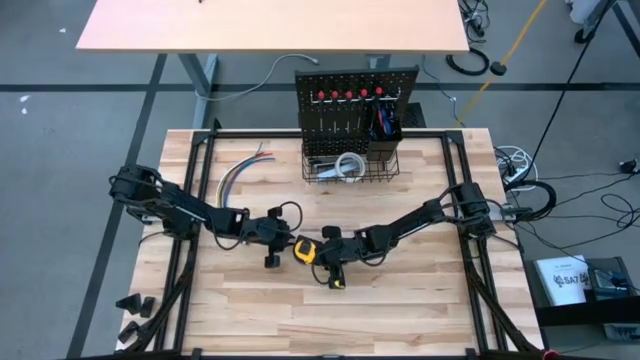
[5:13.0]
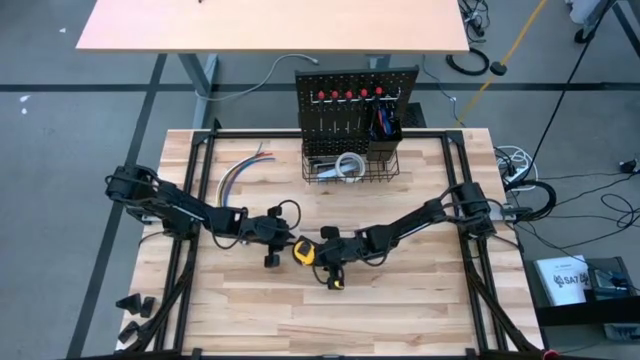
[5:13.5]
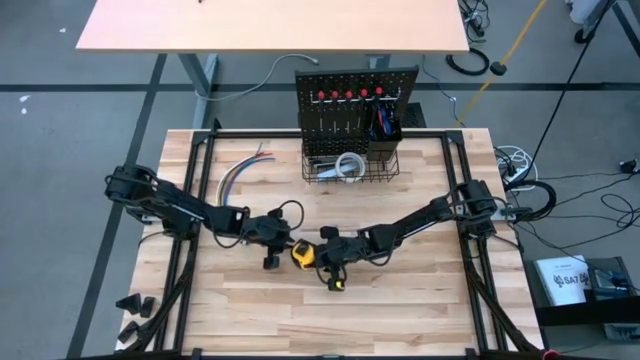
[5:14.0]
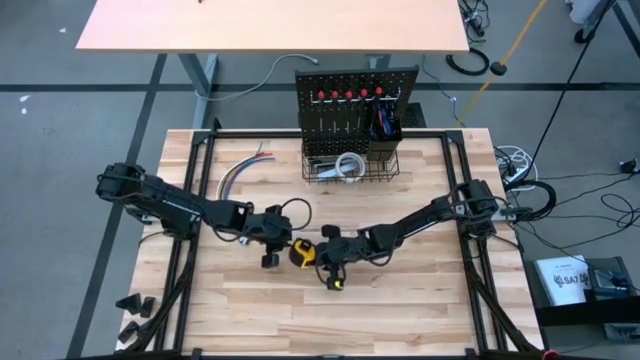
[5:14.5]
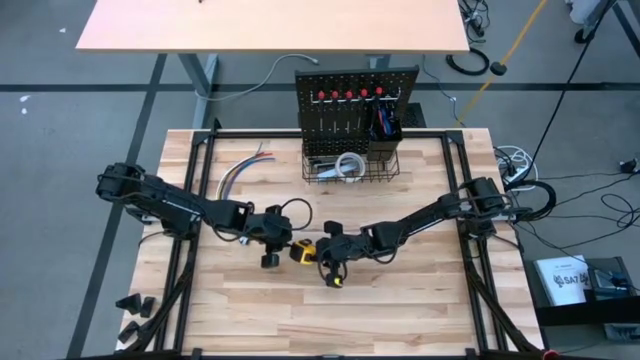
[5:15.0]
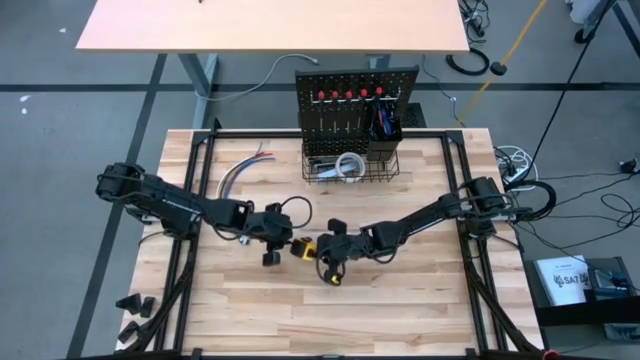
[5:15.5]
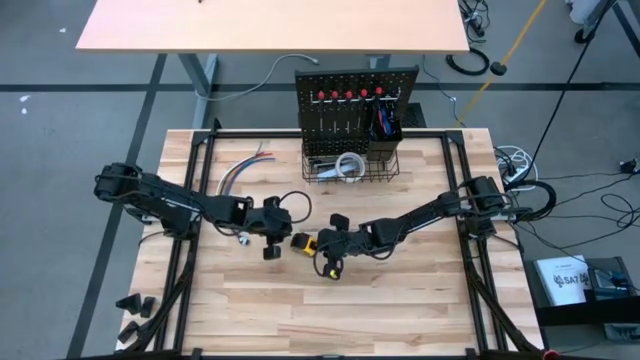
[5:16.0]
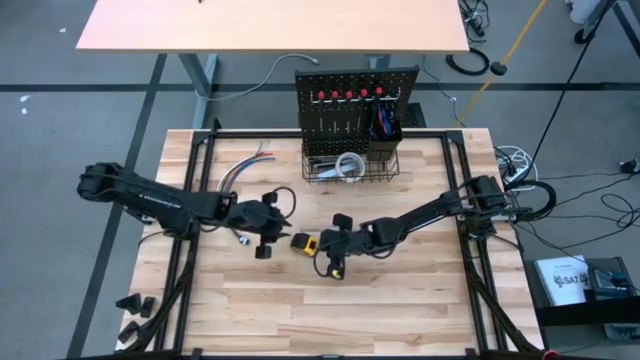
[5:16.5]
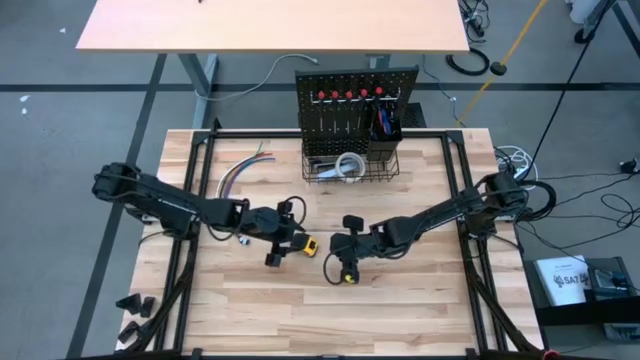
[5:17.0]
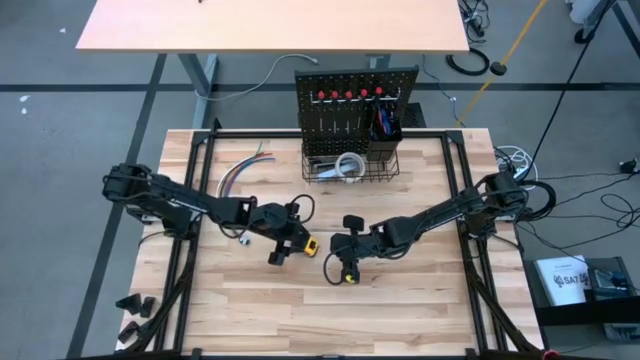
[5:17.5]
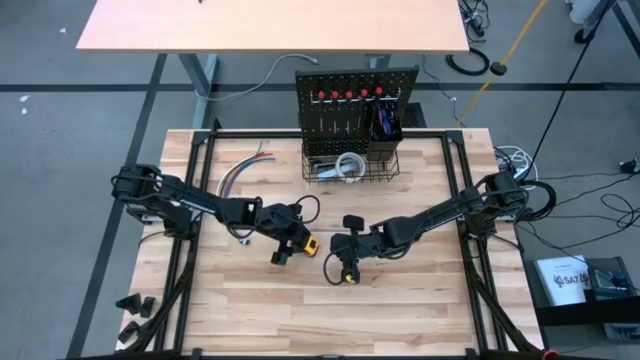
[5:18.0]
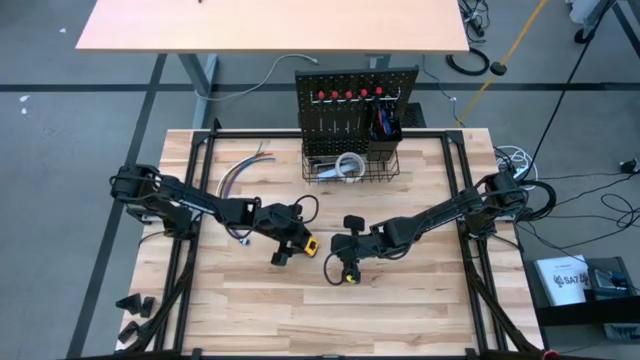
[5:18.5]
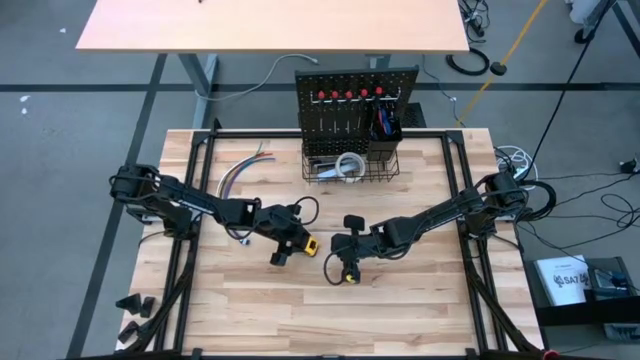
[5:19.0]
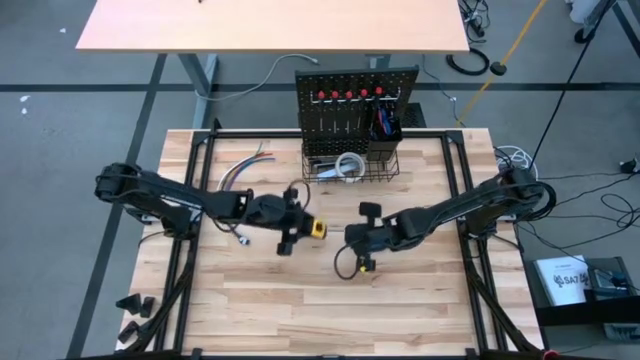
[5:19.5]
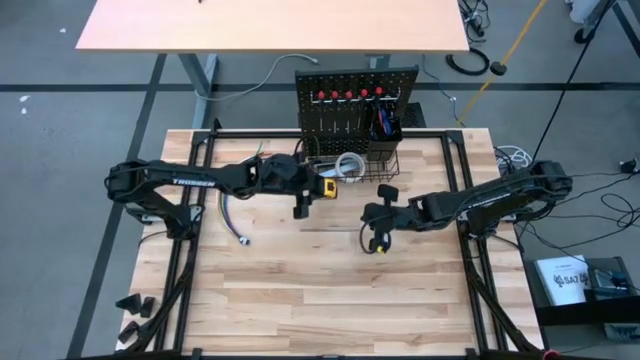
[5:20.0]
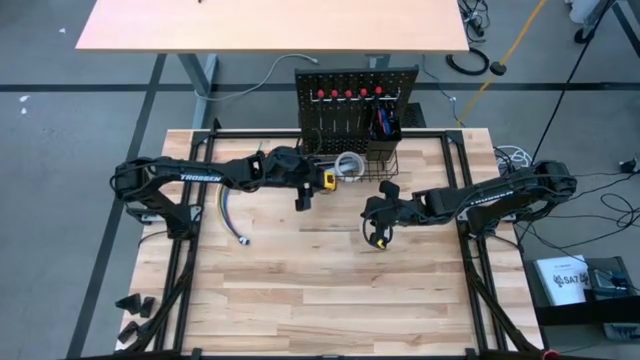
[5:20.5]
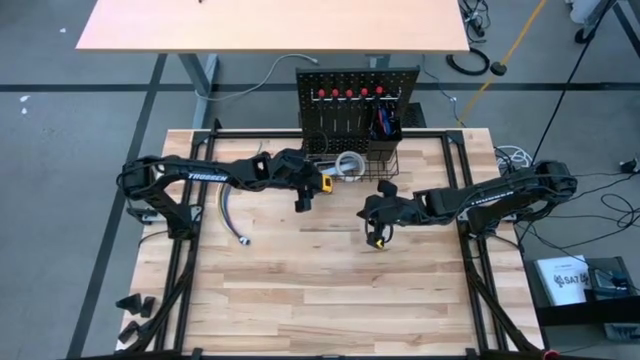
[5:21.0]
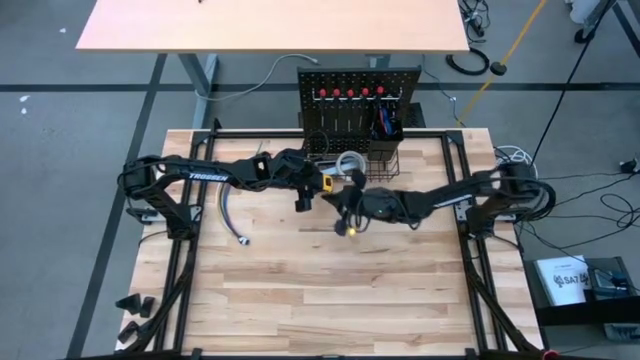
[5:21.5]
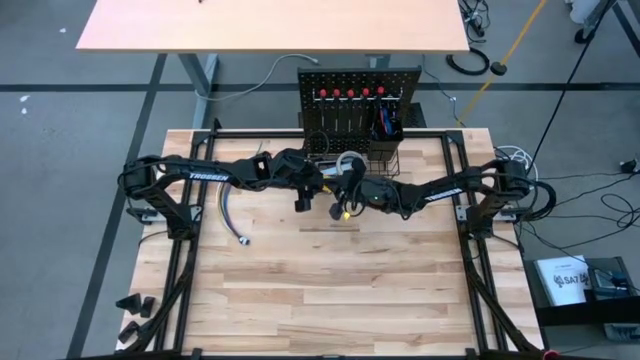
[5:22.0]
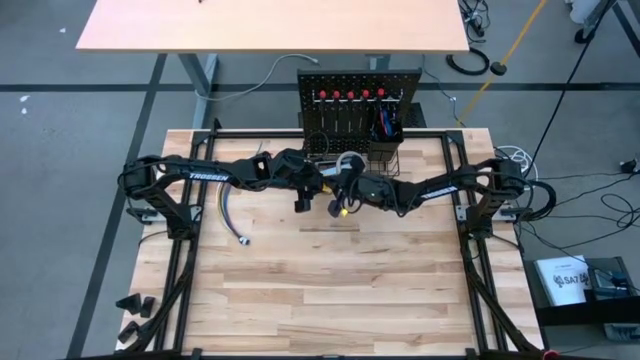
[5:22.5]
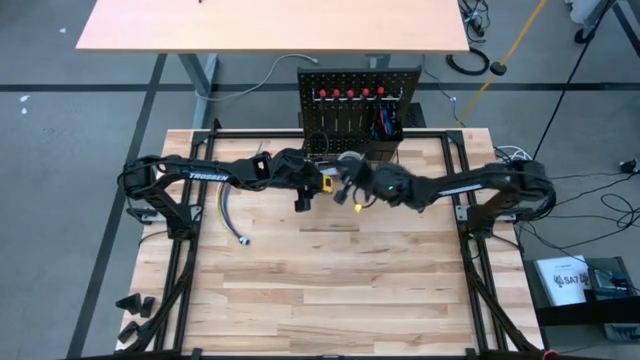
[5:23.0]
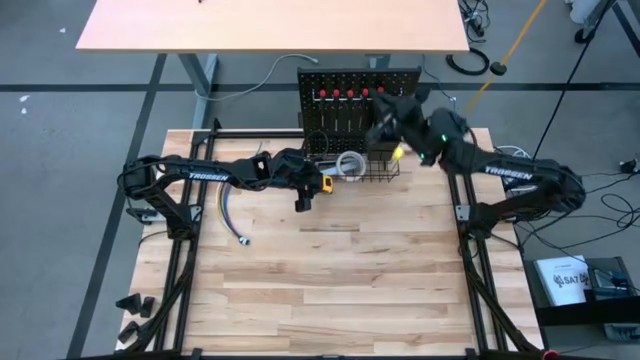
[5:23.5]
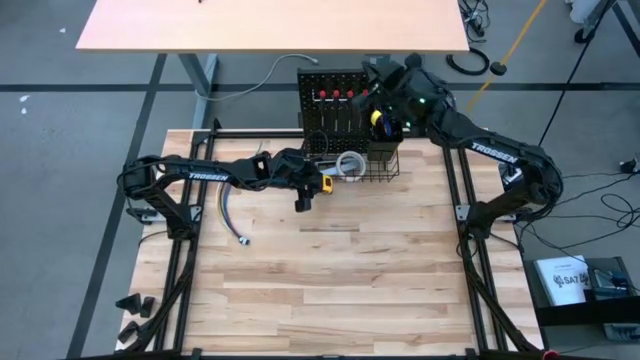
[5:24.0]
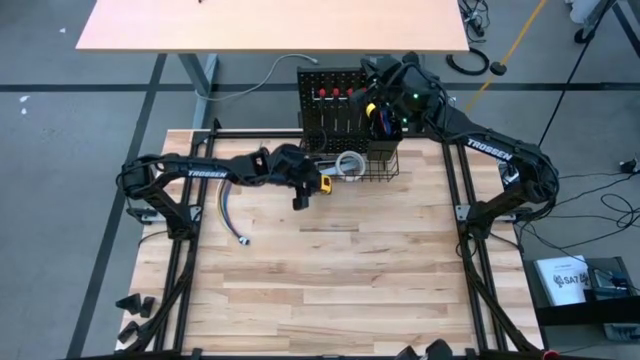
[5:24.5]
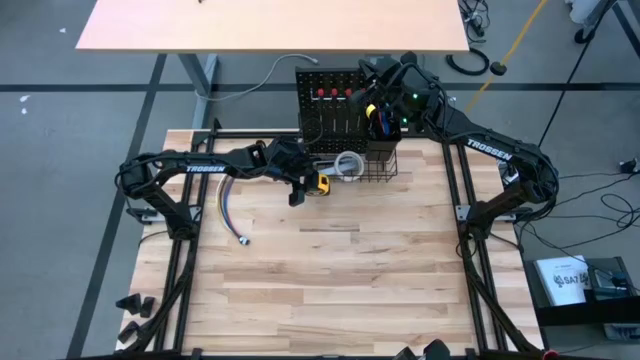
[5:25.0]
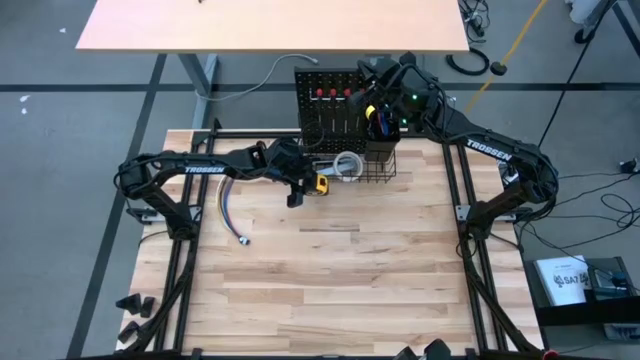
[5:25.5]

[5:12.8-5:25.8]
Task: Hang tools onto peg board
Hang the tape measure on the wire basket on the pegboard

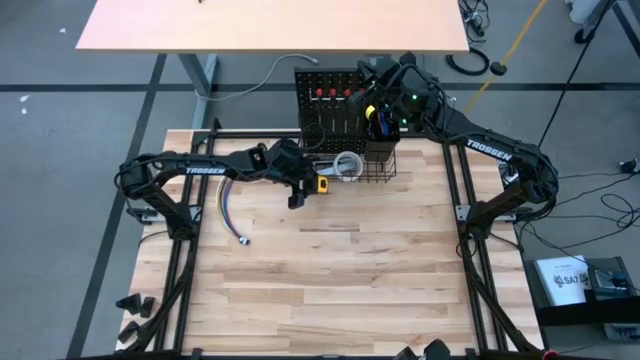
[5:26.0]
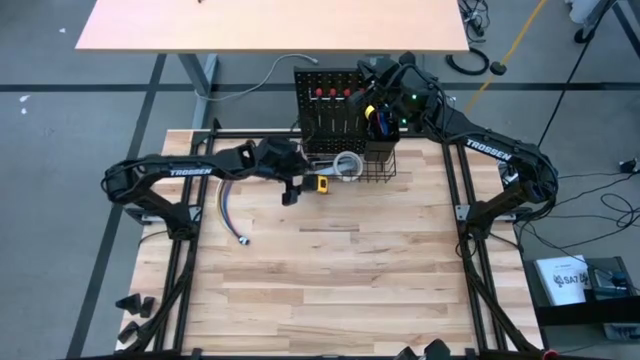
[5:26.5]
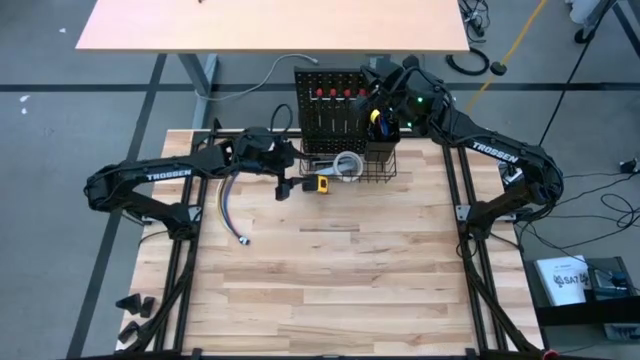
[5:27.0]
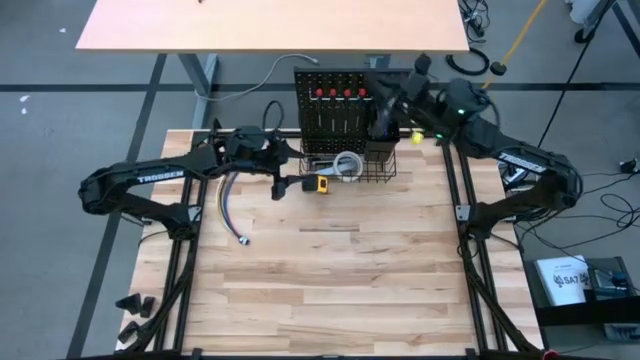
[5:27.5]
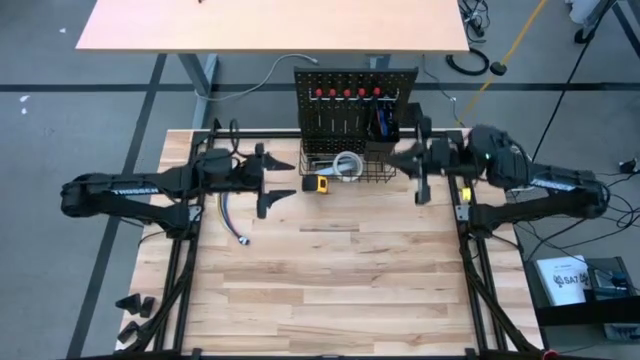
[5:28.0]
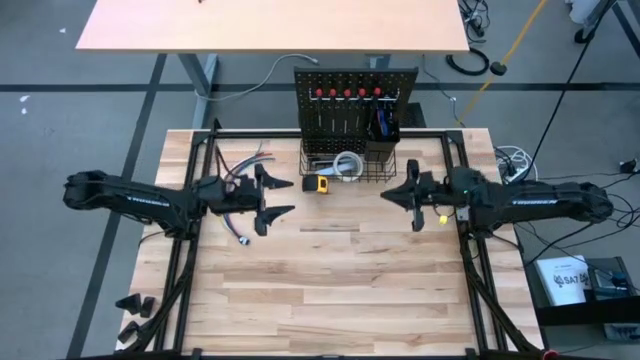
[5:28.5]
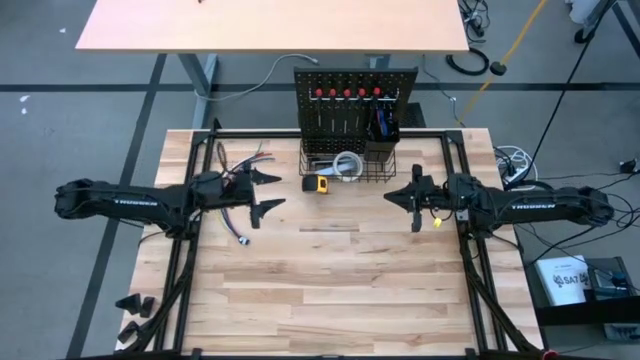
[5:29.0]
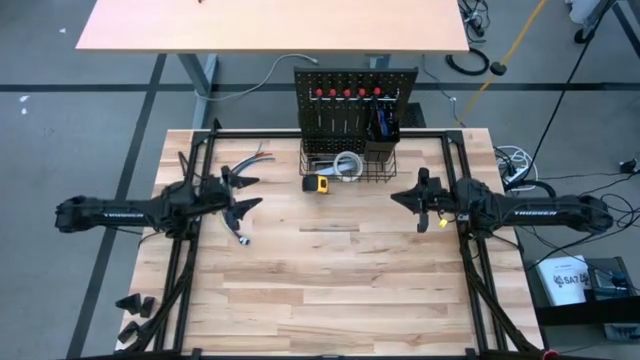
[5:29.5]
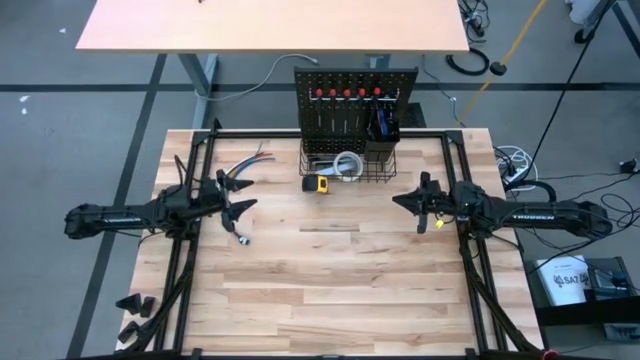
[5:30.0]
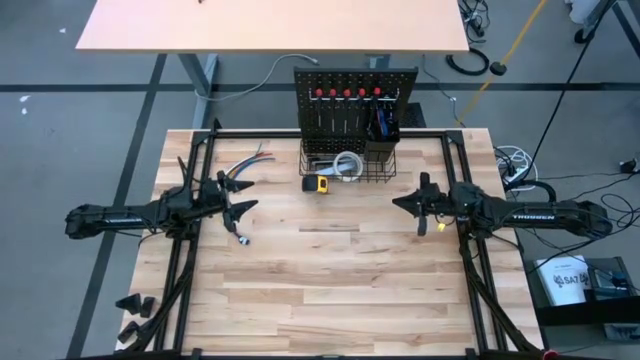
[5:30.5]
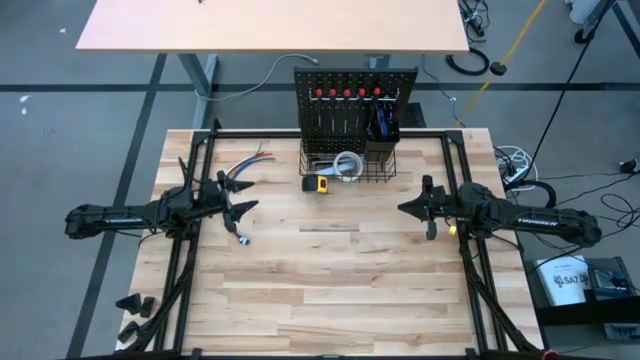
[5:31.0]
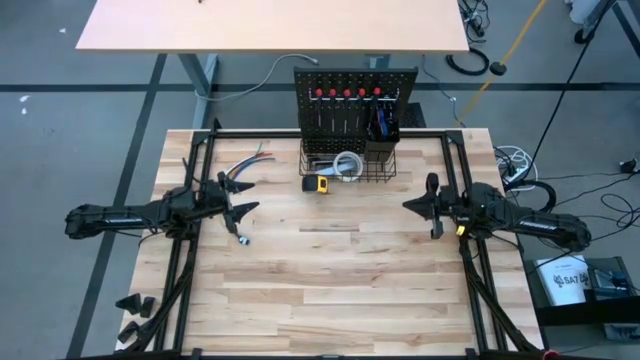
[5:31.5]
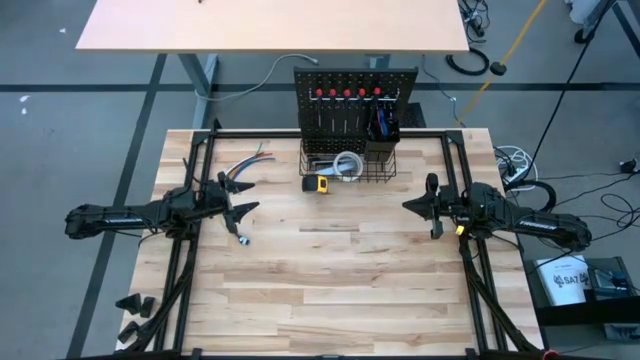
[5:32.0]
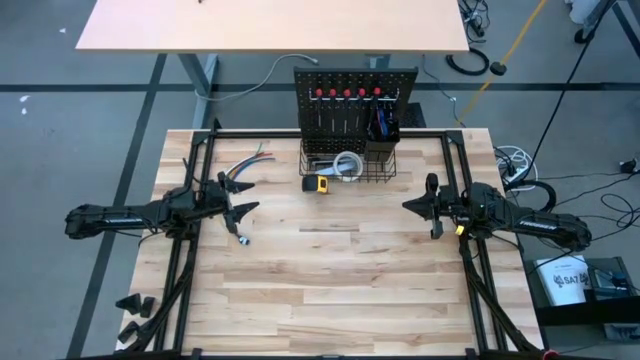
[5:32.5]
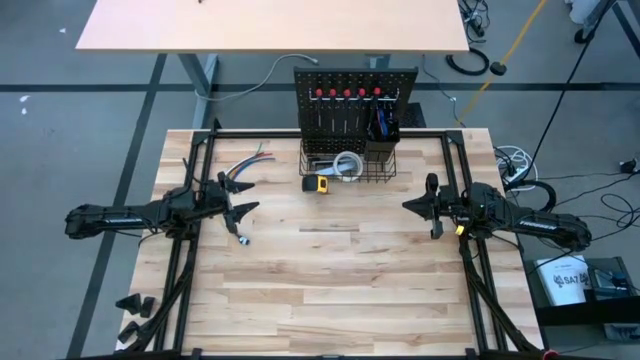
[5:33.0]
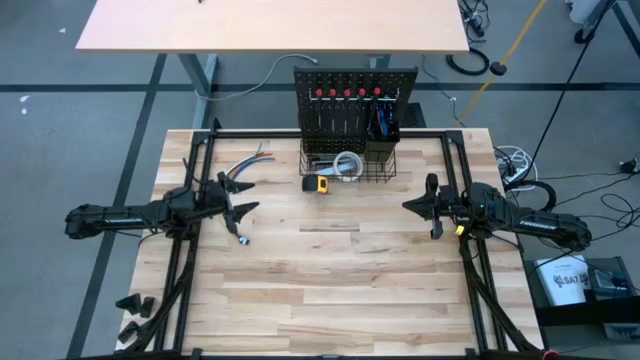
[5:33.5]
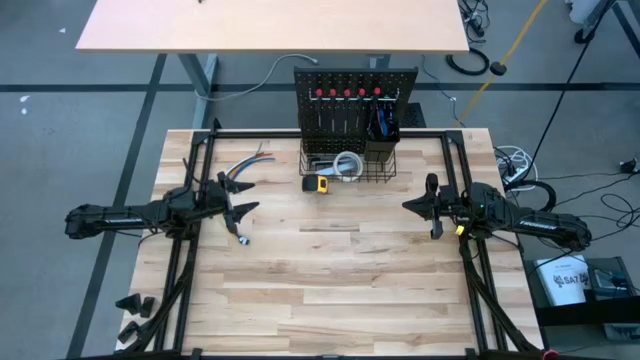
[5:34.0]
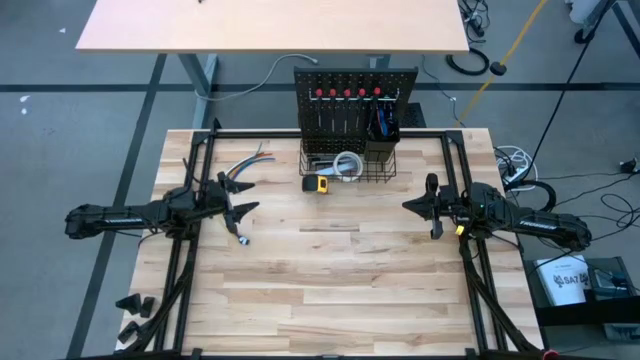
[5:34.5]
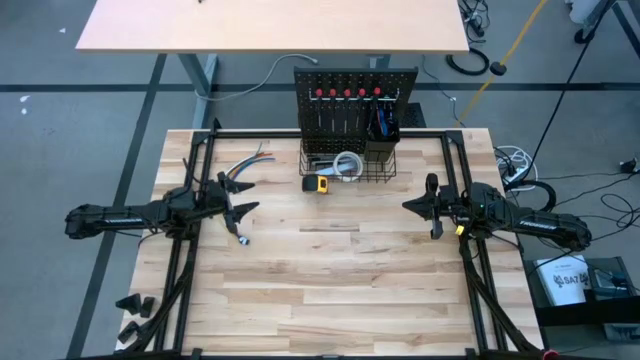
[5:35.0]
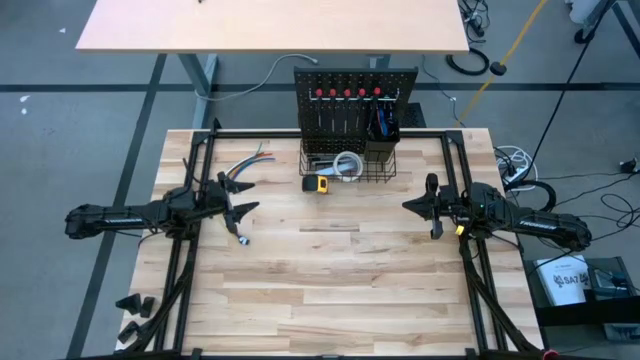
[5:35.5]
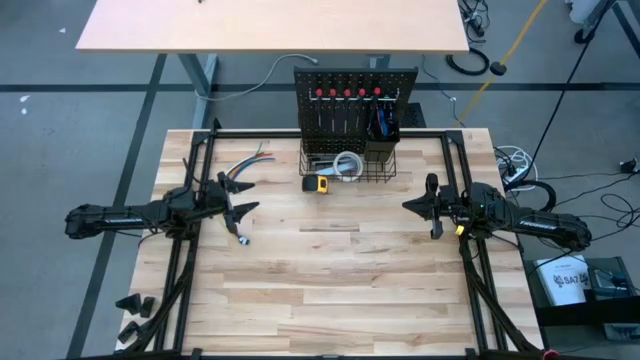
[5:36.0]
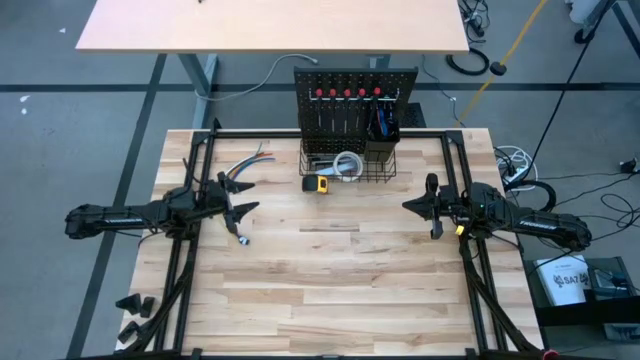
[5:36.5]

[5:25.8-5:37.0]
Return to Home Position
